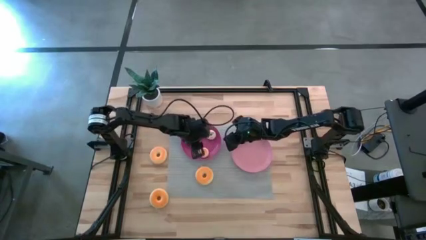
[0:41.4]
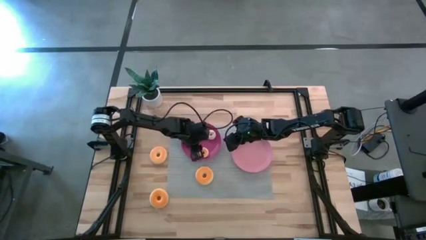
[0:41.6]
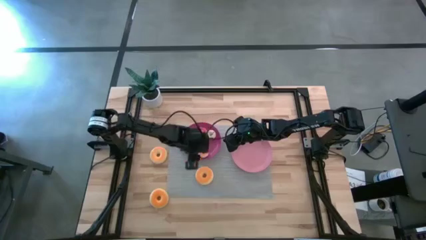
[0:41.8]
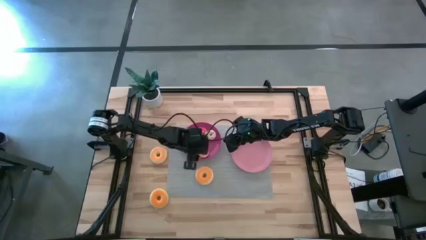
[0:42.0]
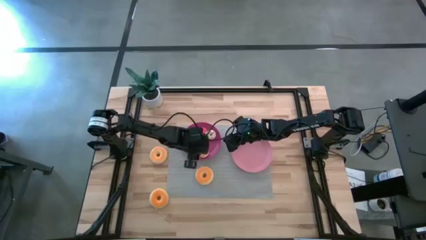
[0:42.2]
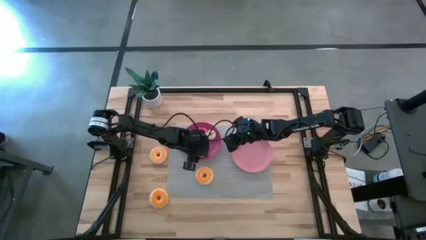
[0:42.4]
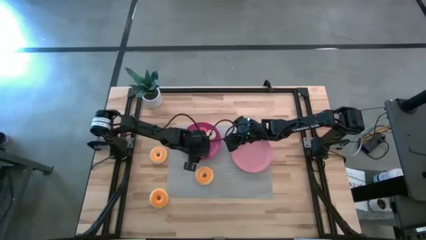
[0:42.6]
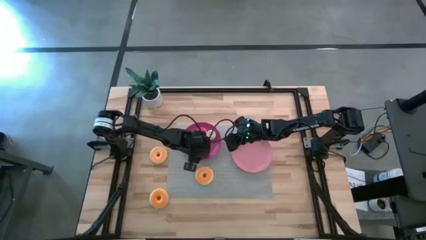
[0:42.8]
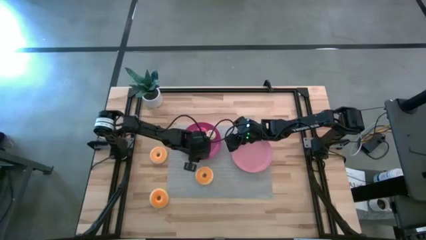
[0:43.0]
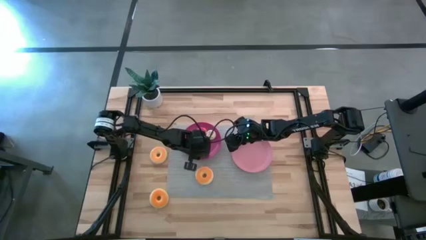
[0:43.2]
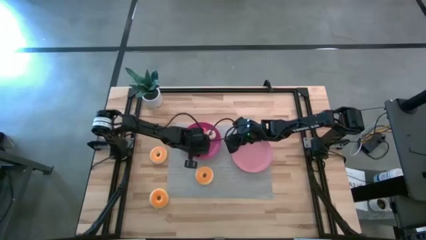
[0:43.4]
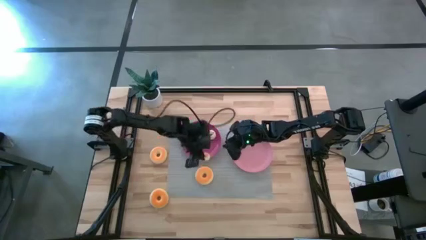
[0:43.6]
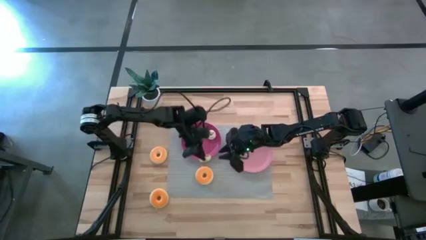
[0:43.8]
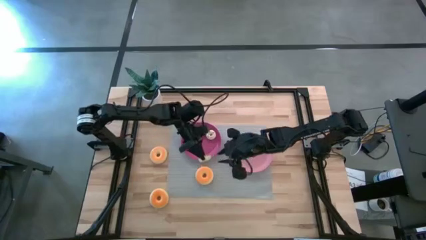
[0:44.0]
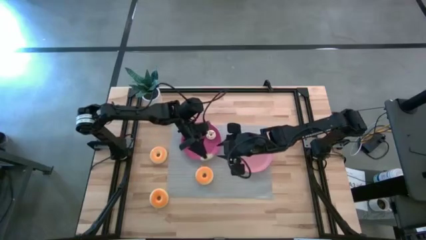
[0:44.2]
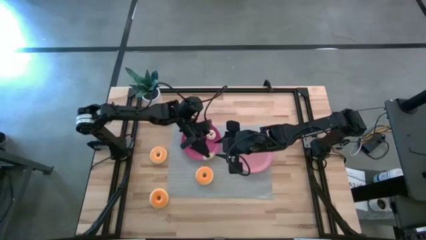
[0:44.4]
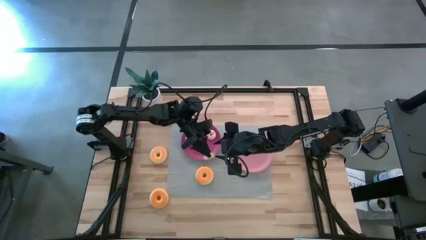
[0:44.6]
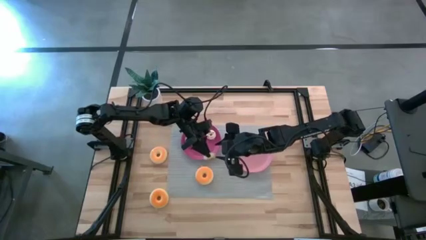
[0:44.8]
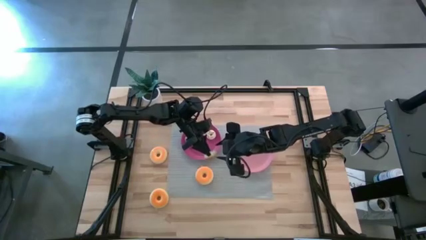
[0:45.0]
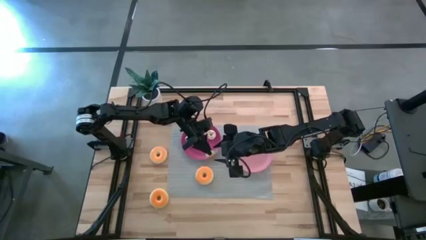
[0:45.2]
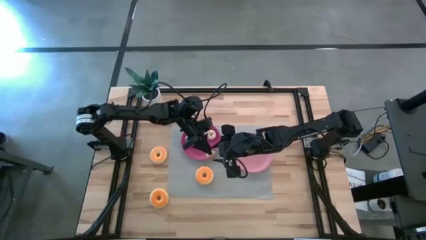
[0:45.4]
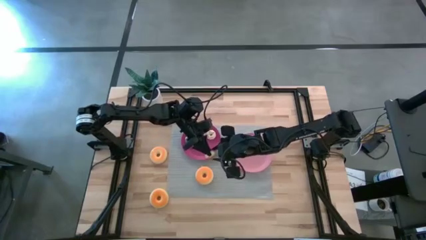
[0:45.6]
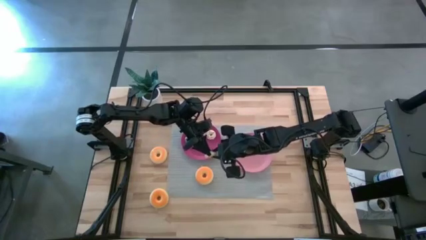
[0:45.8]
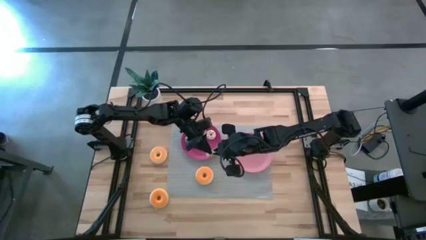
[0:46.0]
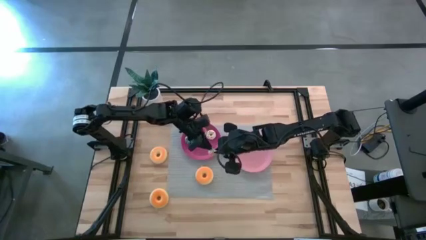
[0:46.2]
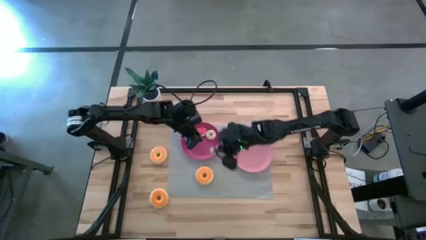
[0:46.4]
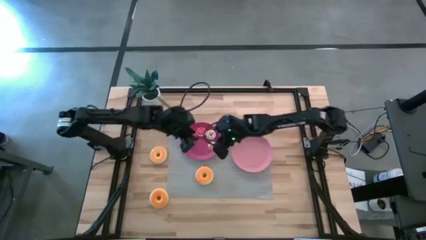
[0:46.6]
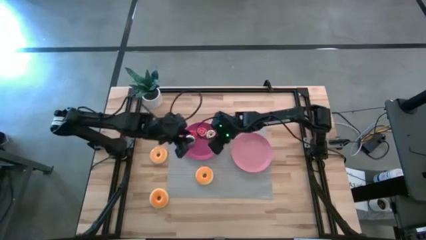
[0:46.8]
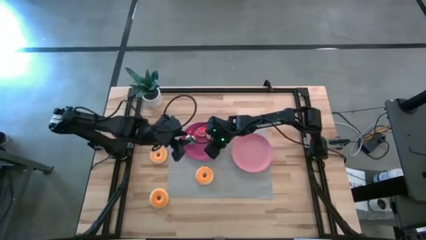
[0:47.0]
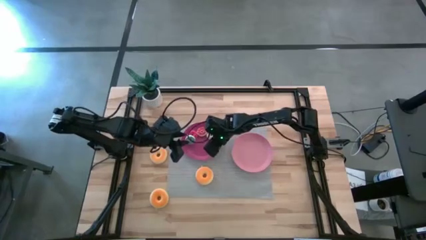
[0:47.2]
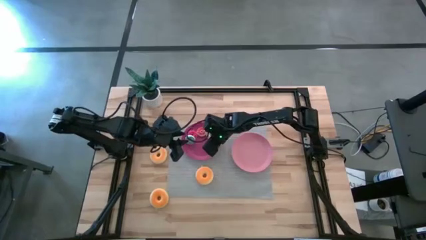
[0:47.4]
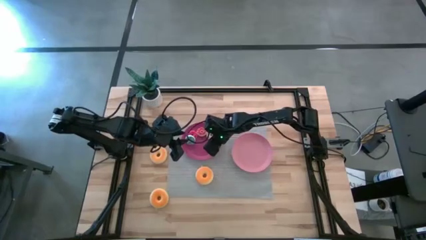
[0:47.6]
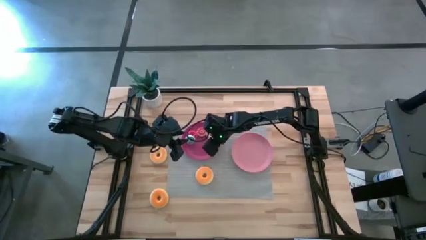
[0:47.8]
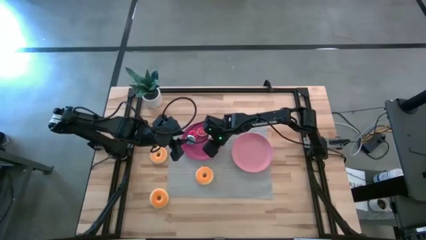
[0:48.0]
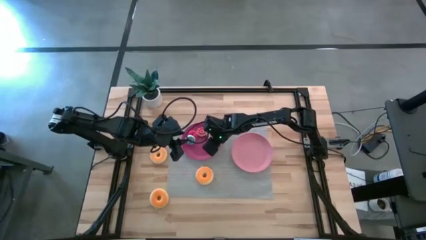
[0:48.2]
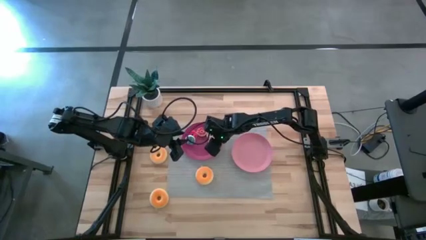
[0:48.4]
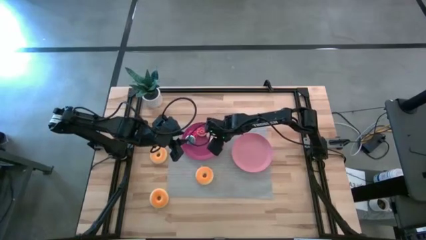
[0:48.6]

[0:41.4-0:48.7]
Task: Pick & Place donuts
Put the small yellow donut on the pink plate

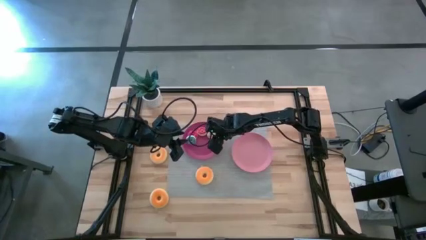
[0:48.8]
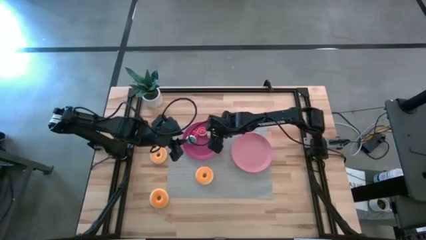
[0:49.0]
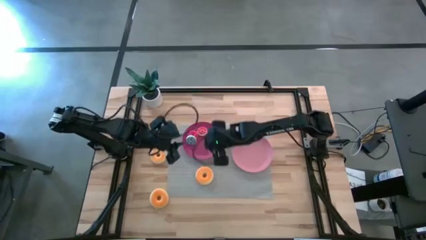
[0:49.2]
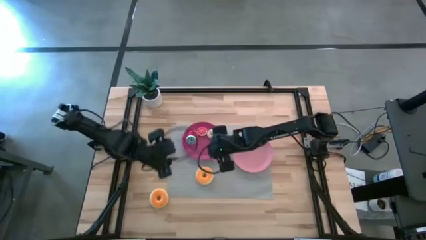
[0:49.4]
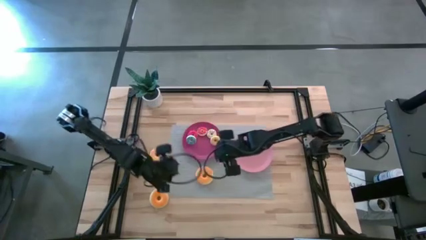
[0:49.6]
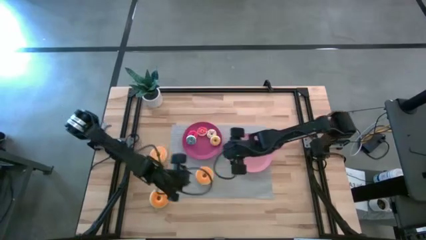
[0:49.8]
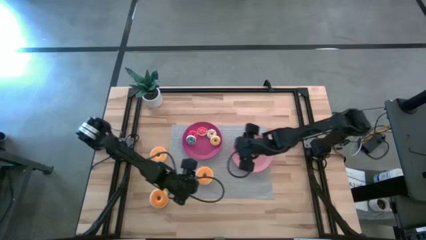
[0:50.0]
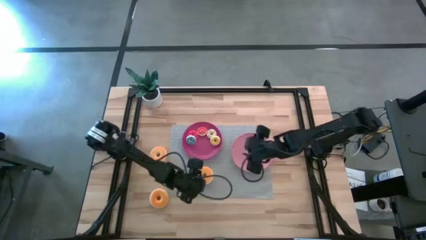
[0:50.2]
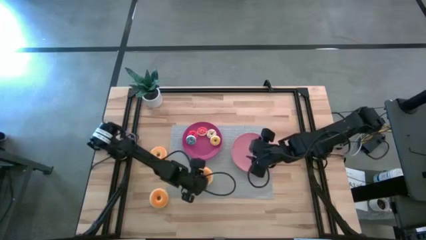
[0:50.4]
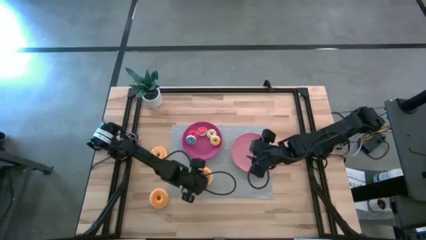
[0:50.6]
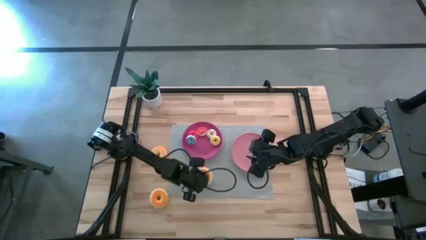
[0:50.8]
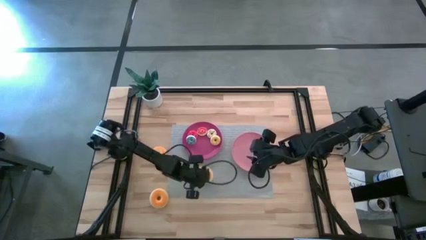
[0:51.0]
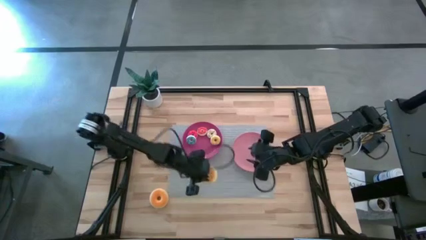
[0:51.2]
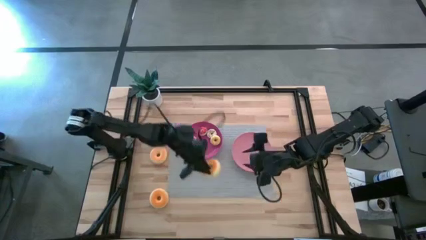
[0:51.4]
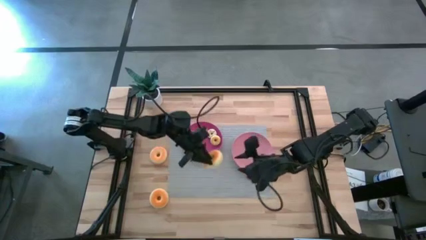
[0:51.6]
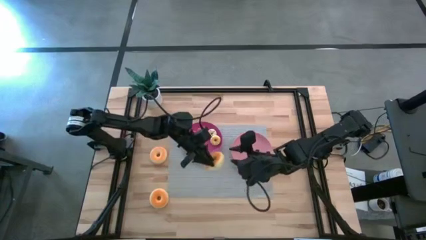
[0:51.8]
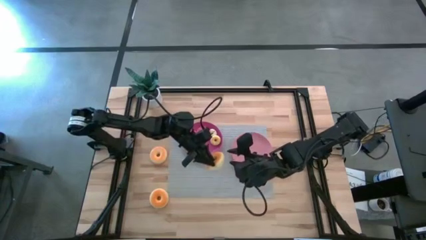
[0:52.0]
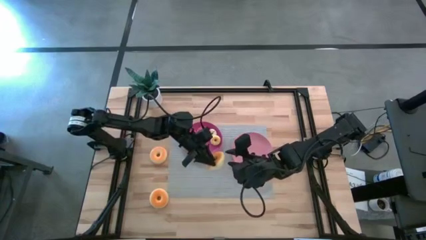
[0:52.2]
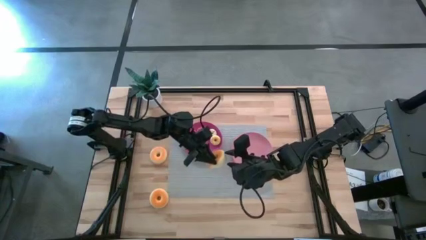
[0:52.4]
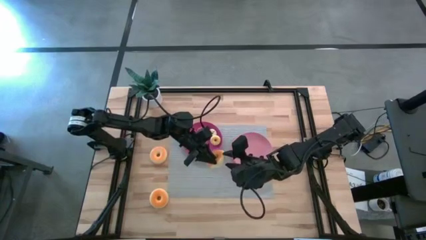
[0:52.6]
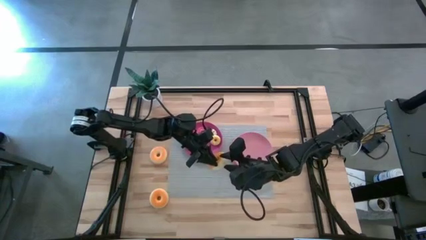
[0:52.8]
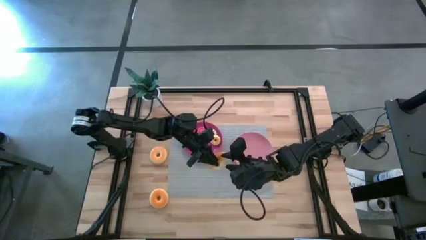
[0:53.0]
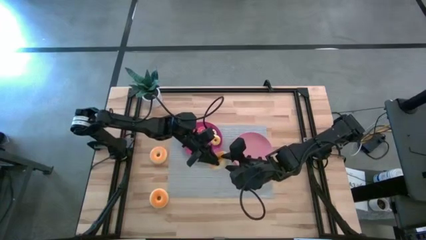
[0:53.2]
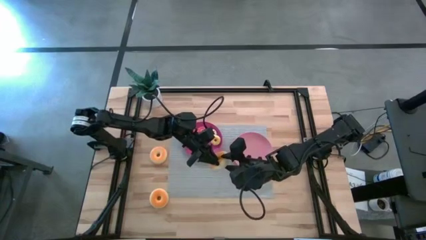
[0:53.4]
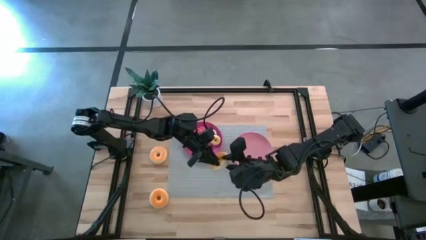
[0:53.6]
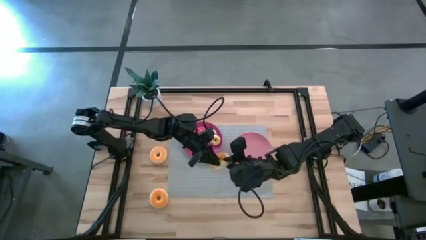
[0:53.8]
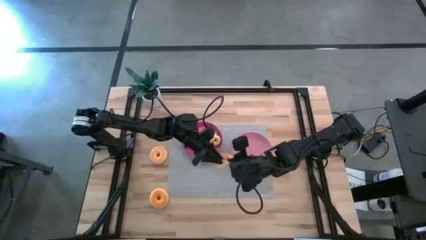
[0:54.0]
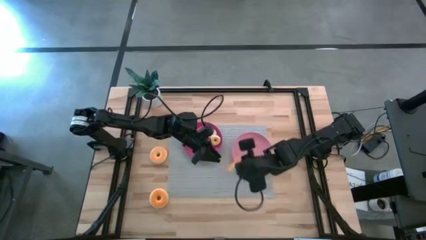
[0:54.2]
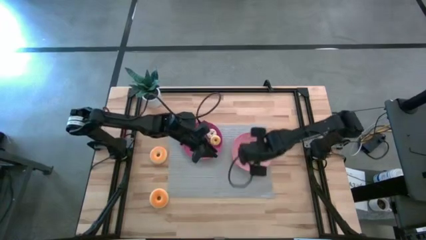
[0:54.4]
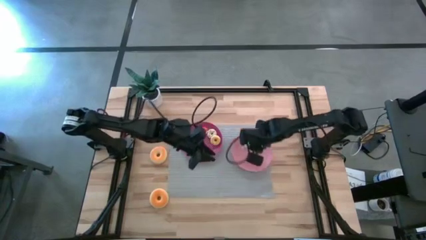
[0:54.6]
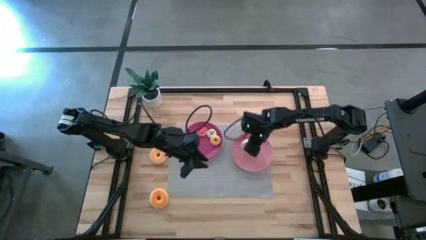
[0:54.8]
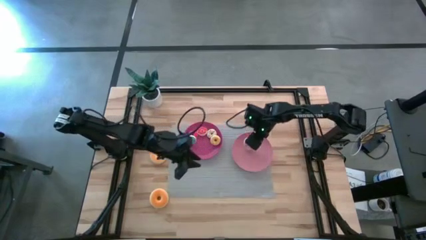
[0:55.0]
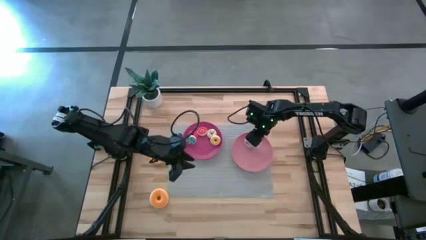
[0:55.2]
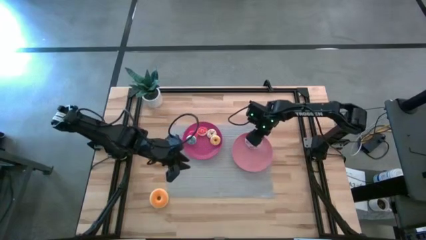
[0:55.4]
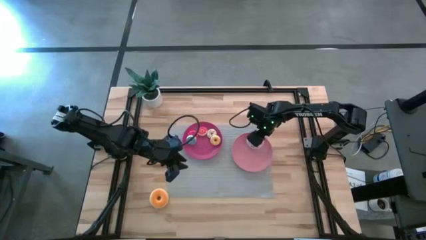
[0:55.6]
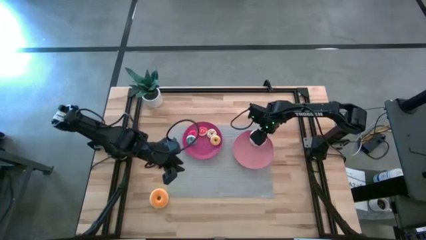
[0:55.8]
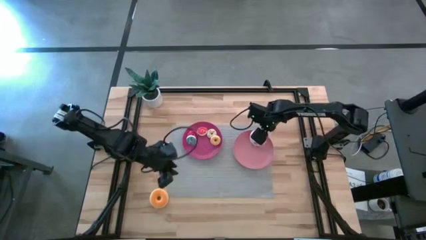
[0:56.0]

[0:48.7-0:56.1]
Put the large white donut on the light pink plate
